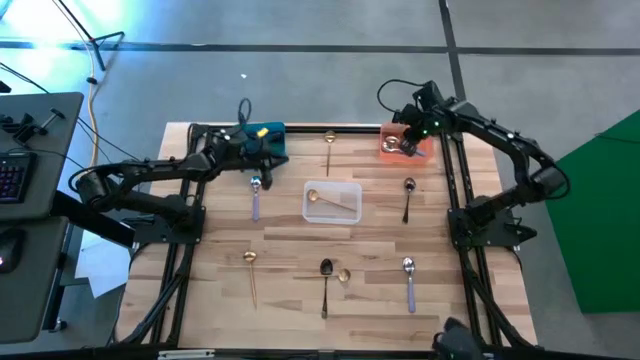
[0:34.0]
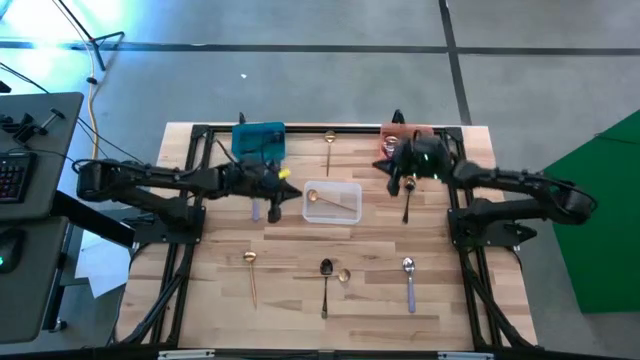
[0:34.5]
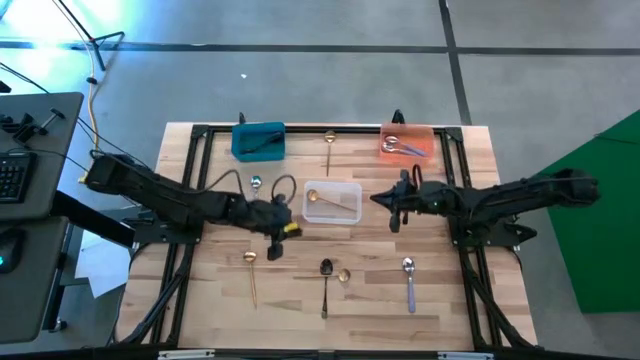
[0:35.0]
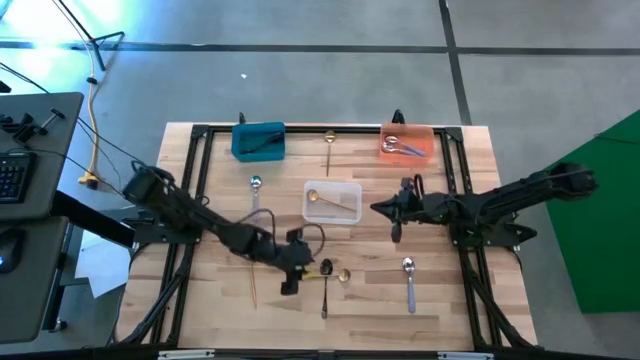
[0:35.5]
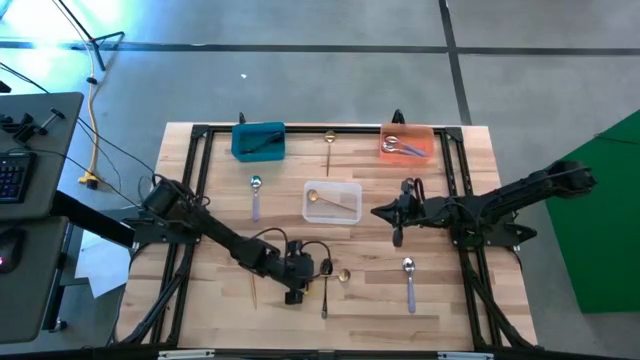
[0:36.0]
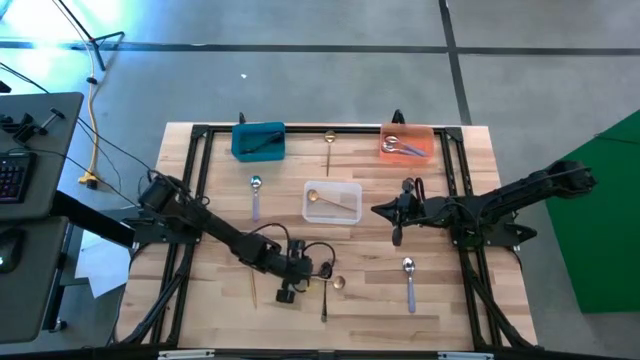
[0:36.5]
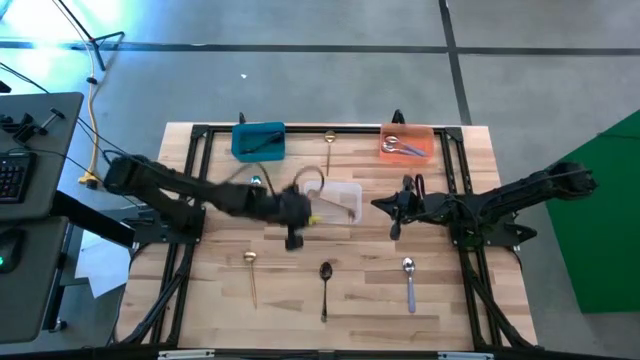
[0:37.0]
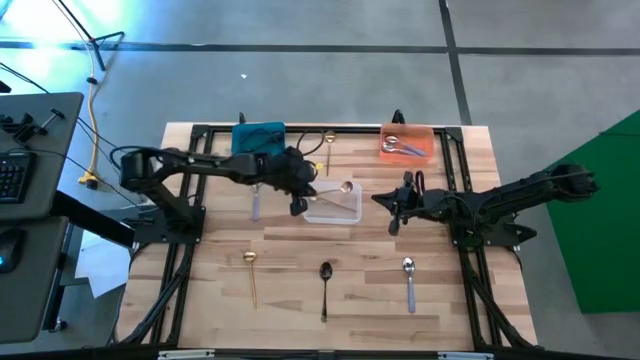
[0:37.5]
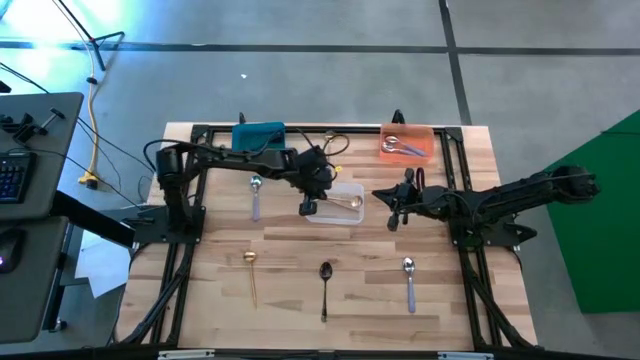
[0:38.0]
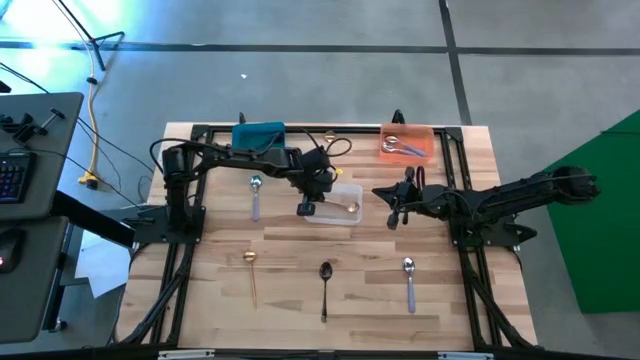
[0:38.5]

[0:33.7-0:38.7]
Task: Sort silverware by color (type)
Put the golden spoon into the white bin

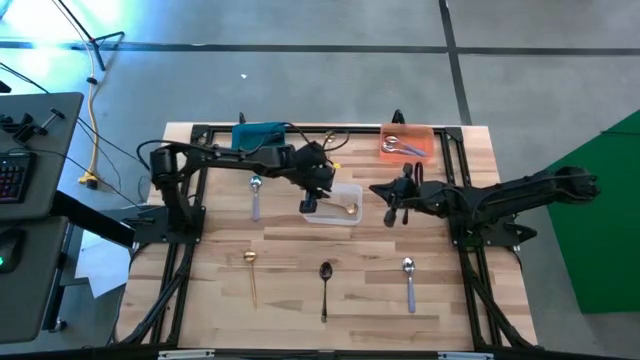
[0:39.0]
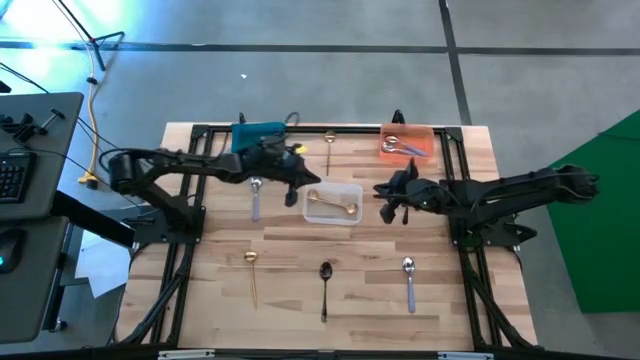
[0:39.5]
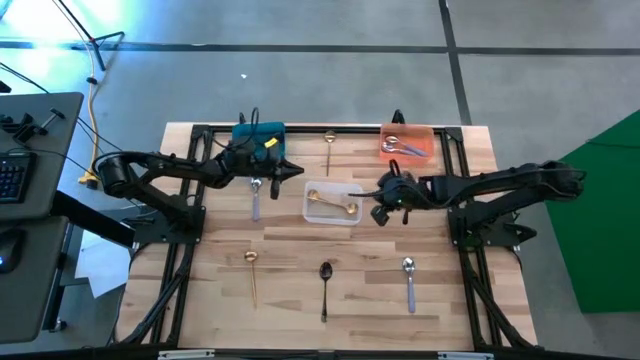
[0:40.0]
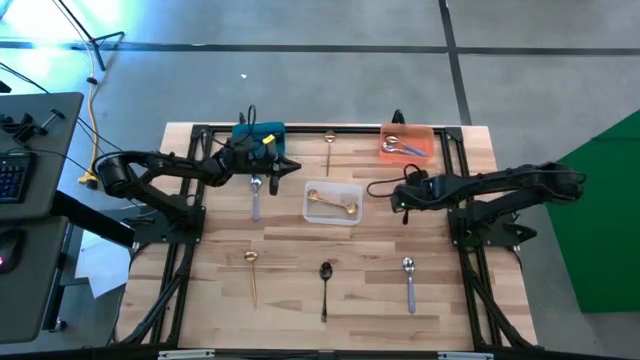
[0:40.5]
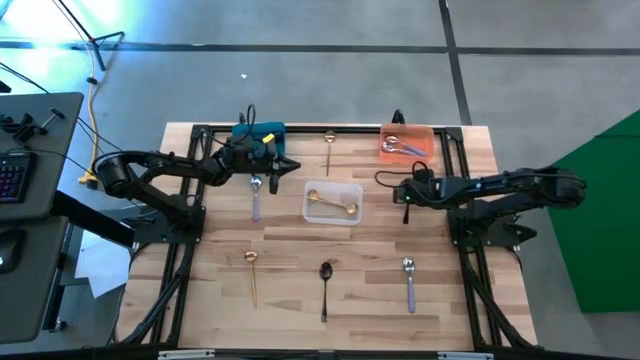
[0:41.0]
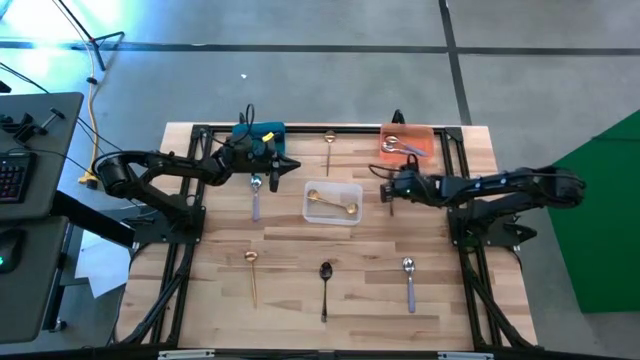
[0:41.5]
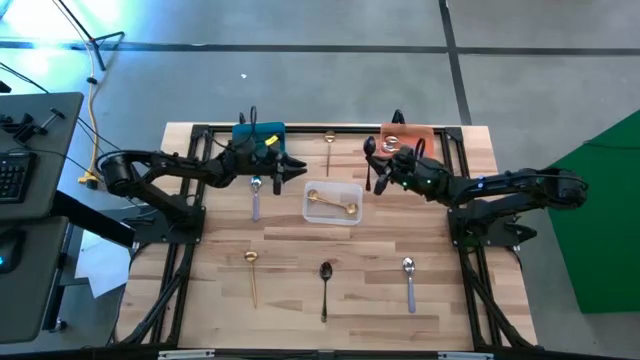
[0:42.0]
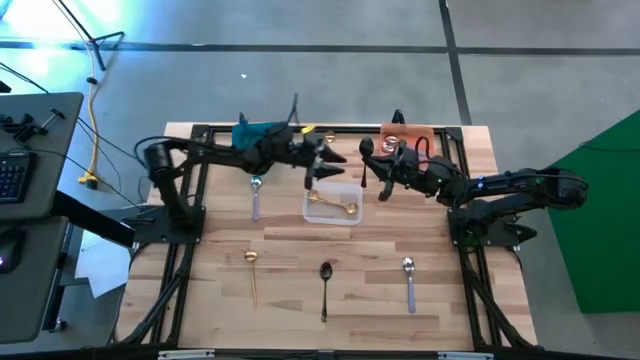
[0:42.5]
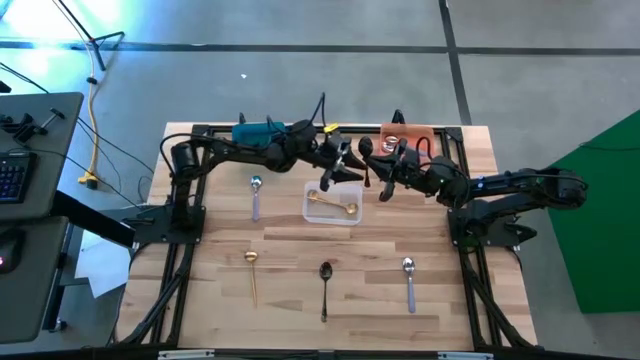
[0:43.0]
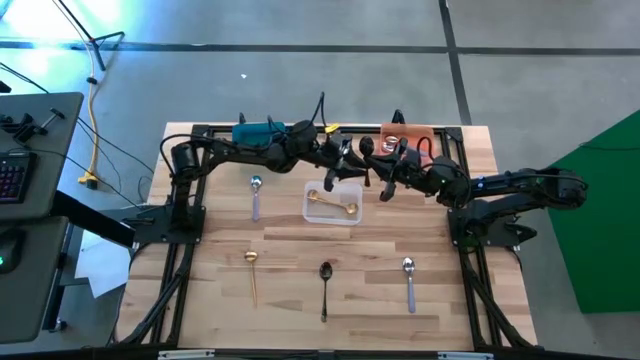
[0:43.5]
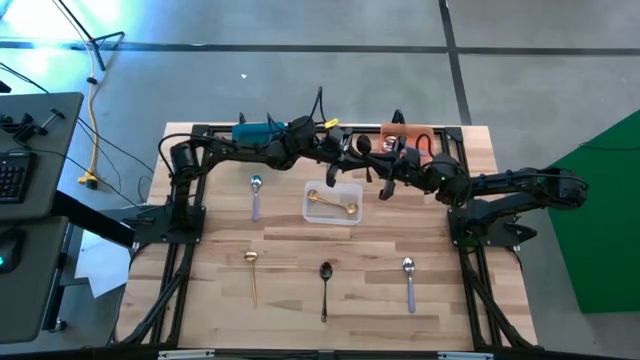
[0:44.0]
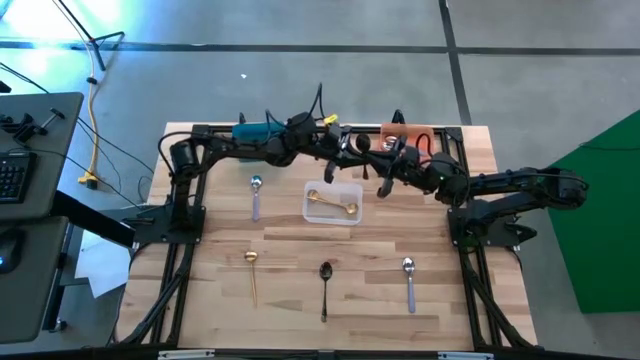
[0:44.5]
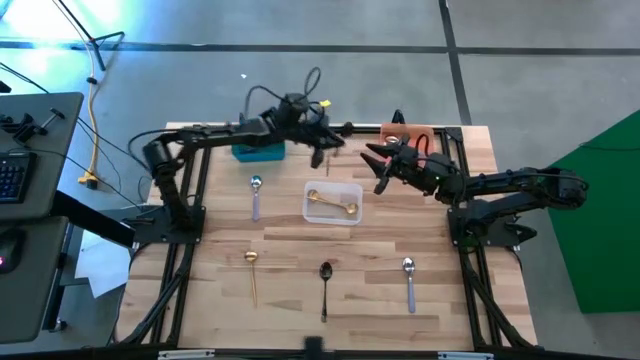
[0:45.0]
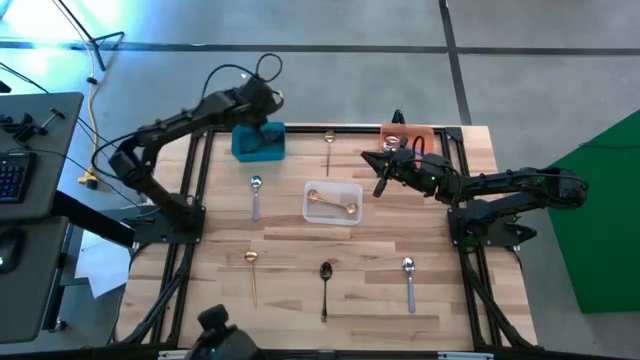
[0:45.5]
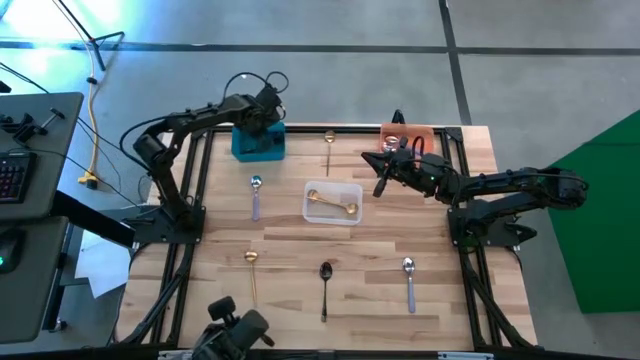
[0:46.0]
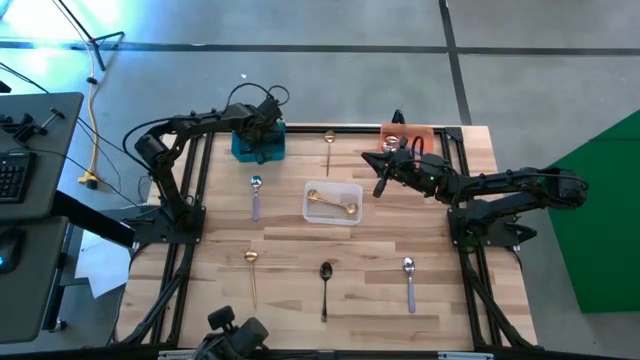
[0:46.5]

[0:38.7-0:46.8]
Put the black spoon into the blue bin

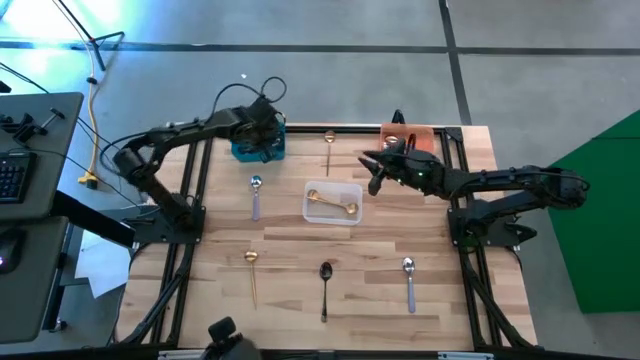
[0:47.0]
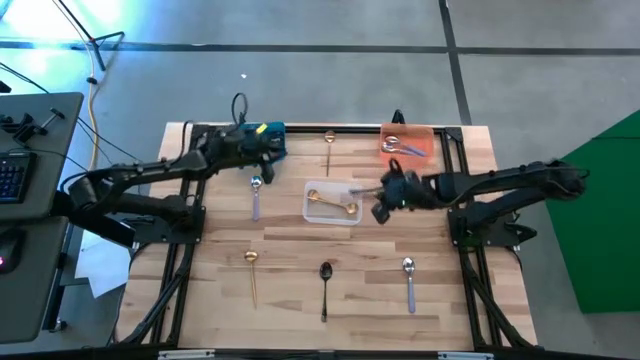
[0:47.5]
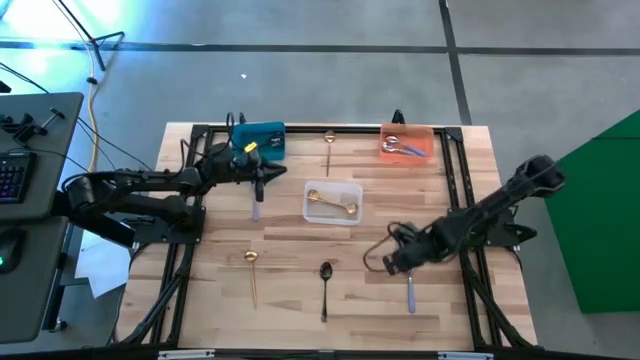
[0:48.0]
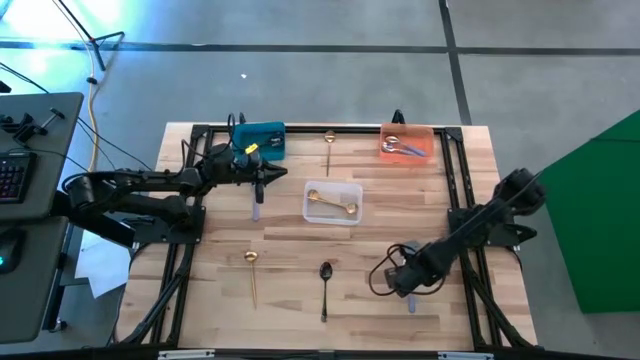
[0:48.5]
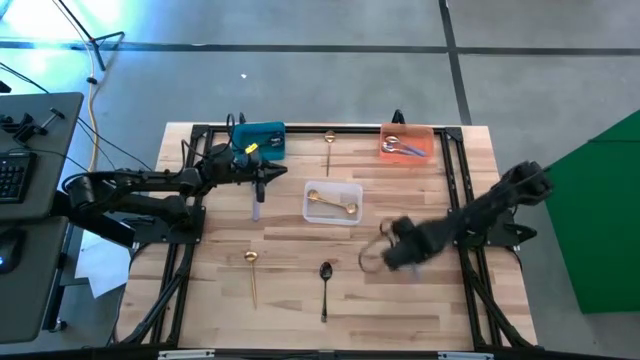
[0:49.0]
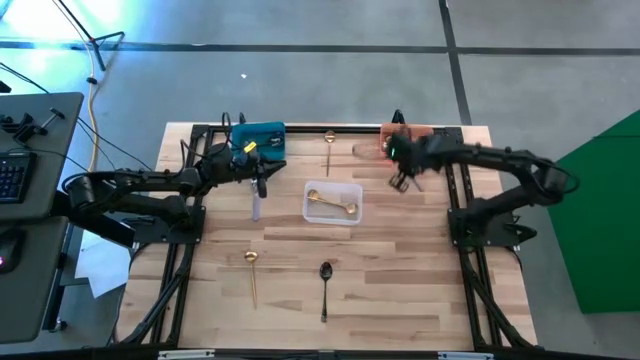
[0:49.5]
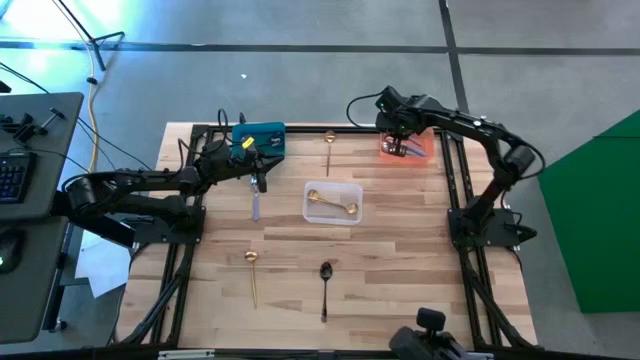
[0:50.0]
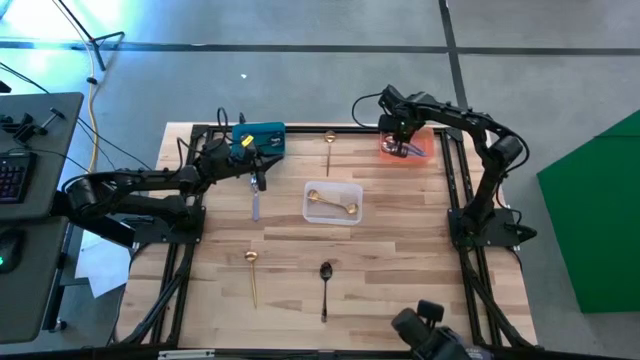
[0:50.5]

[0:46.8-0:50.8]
Put the purple spoon into the orange bin

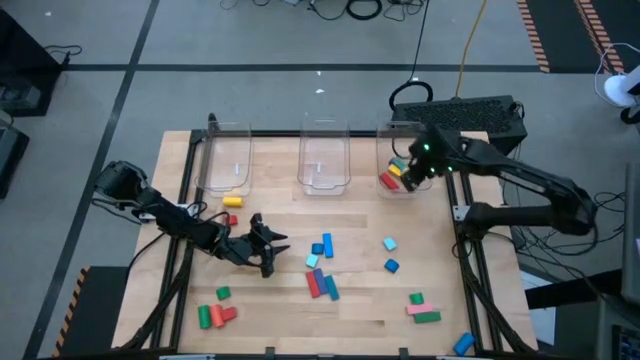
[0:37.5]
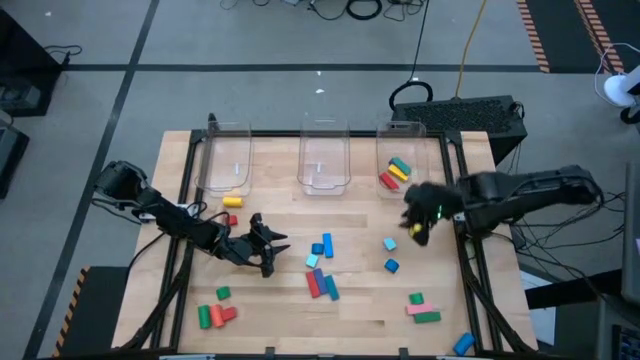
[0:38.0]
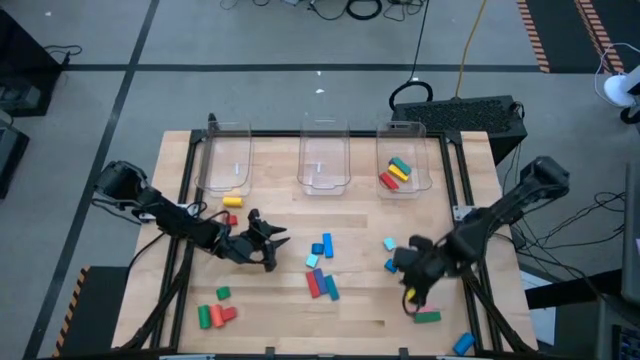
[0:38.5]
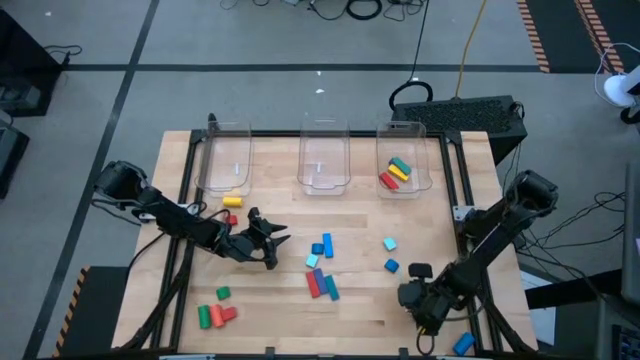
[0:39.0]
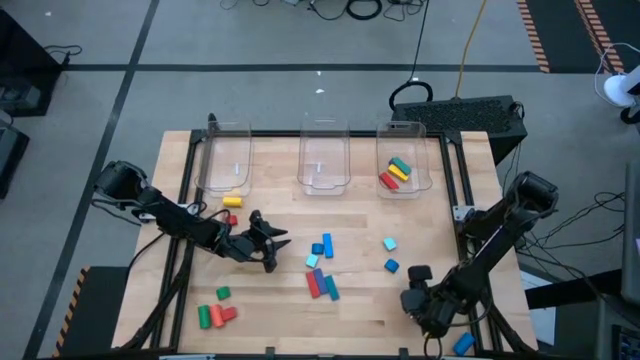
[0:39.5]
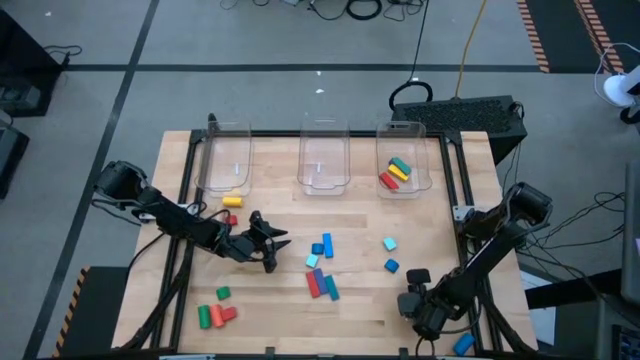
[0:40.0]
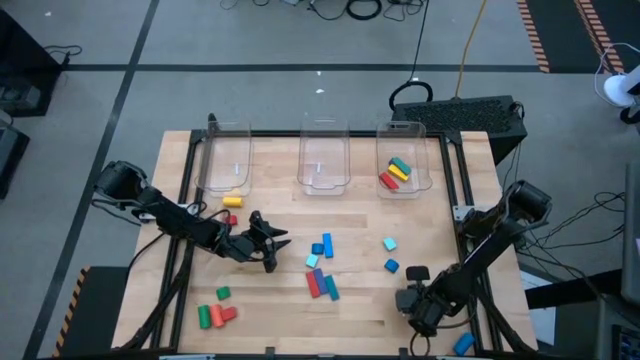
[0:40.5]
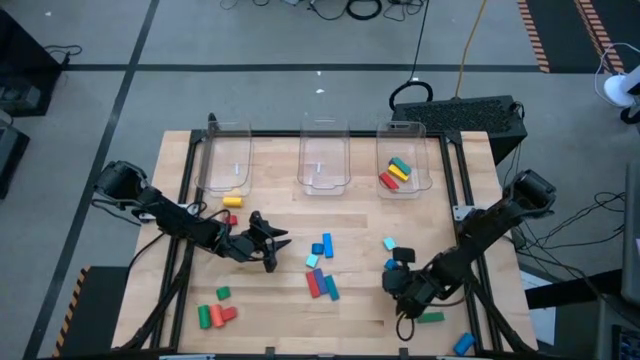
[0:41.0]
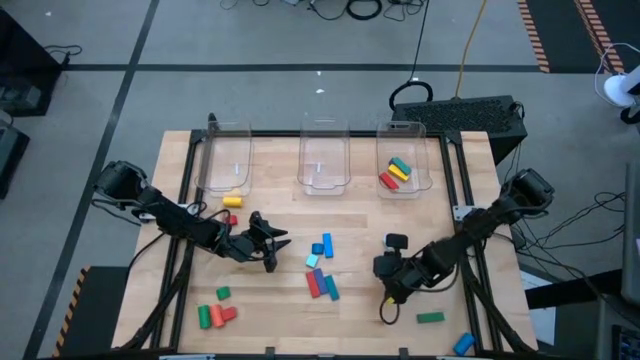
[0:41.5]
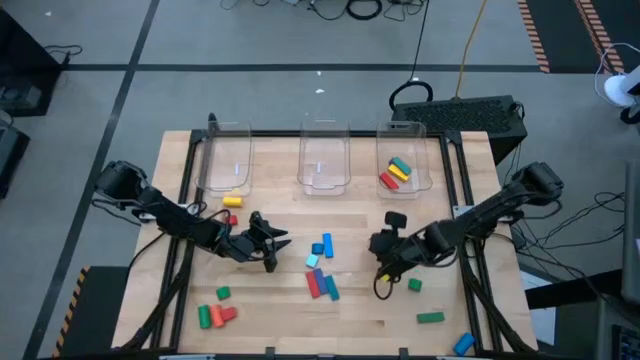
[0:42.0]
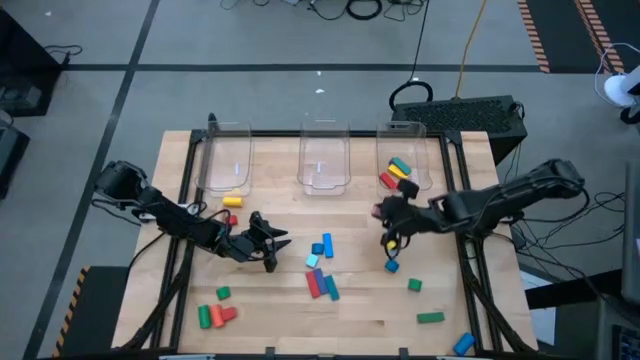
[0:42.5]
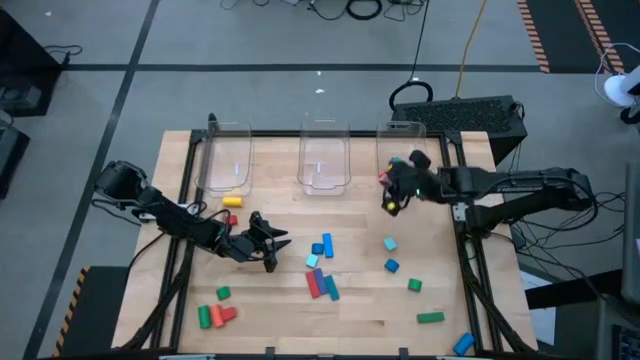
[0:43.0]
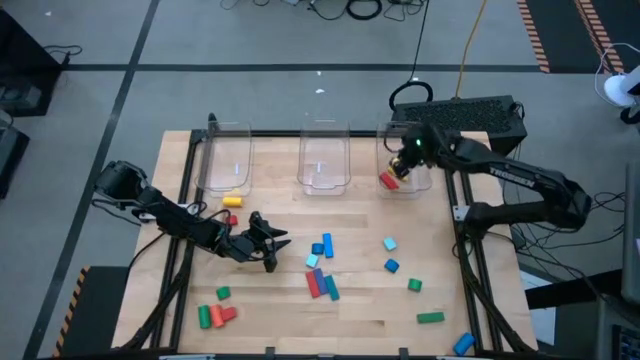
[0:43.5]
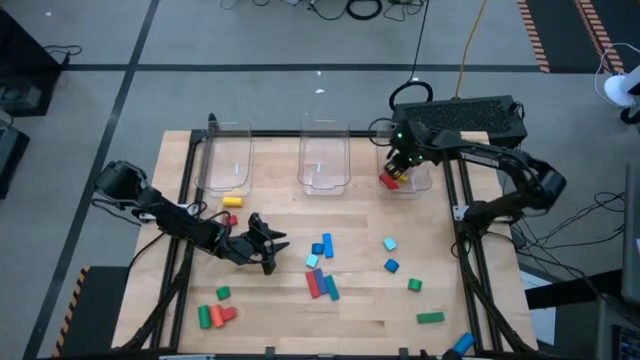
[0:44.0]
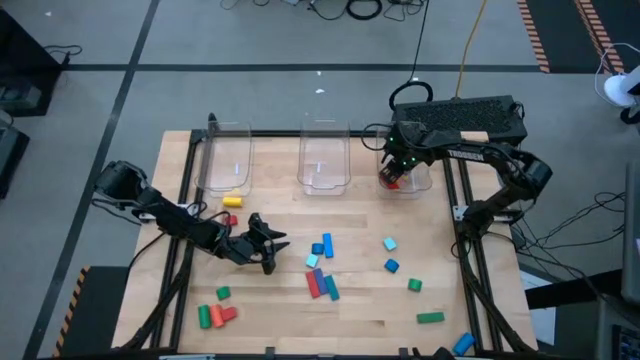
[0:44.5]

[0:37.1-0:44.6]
Task: Sort blocks by size
Put the pink rectangular block into the right transparent bin
